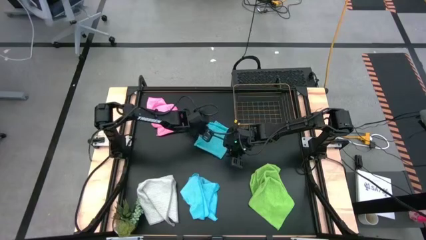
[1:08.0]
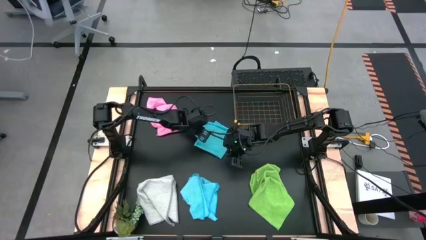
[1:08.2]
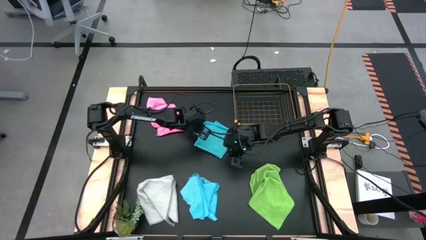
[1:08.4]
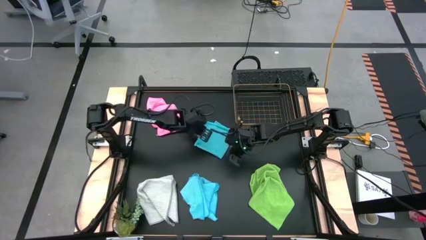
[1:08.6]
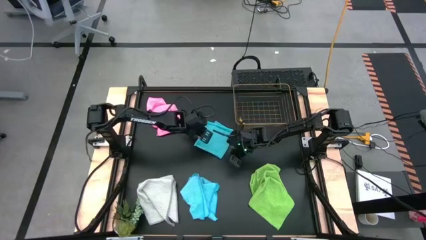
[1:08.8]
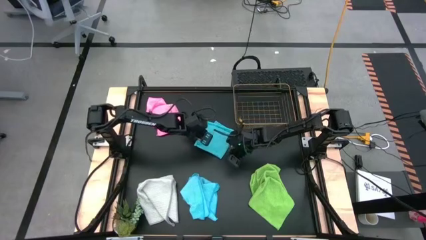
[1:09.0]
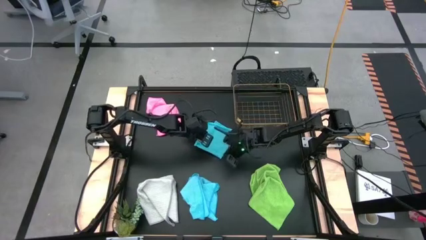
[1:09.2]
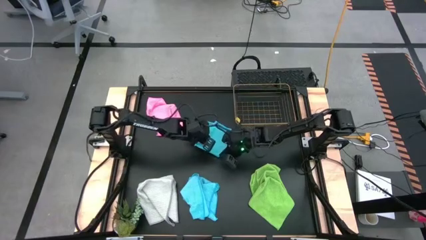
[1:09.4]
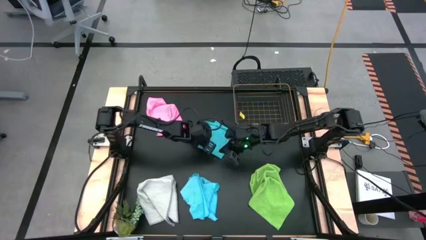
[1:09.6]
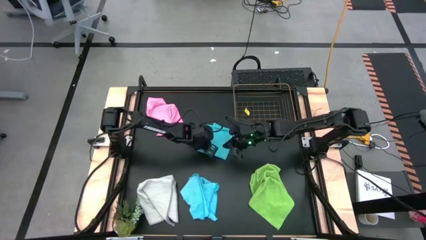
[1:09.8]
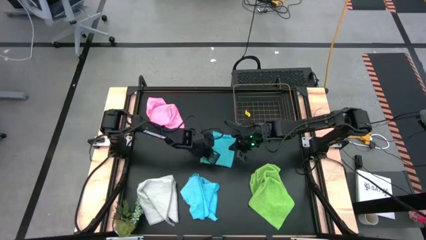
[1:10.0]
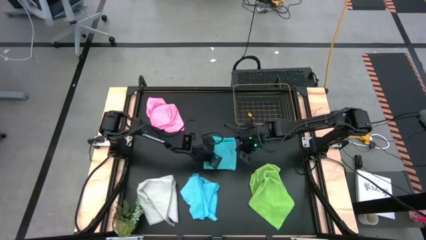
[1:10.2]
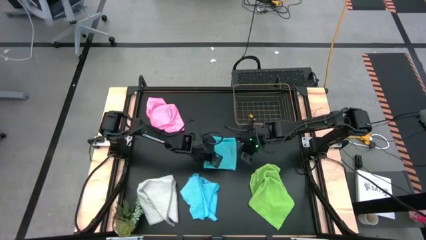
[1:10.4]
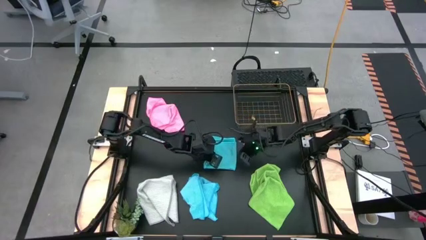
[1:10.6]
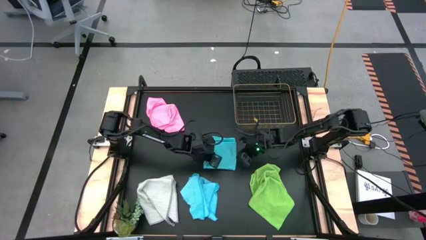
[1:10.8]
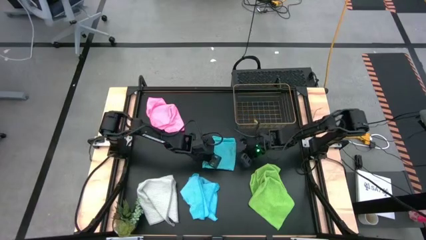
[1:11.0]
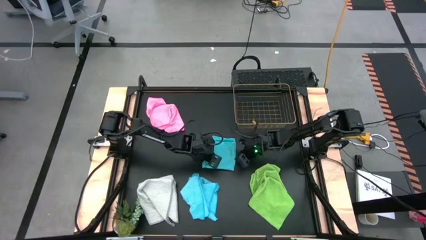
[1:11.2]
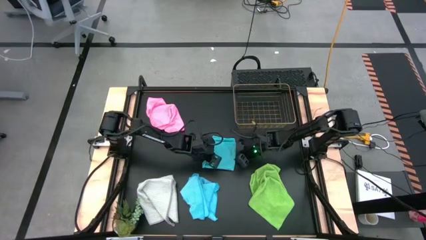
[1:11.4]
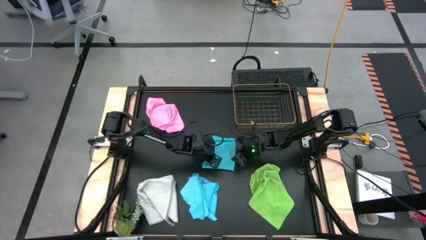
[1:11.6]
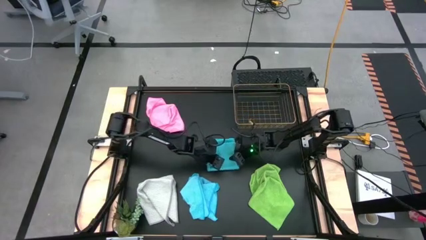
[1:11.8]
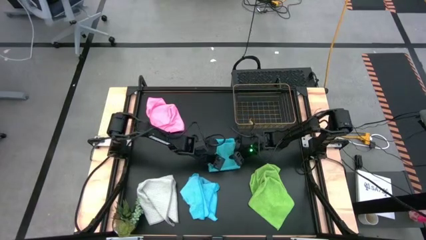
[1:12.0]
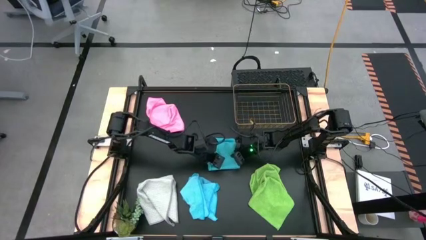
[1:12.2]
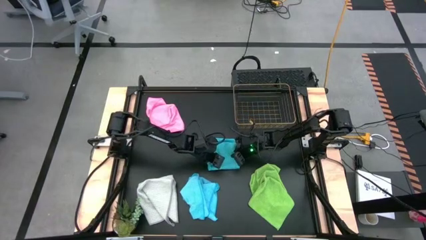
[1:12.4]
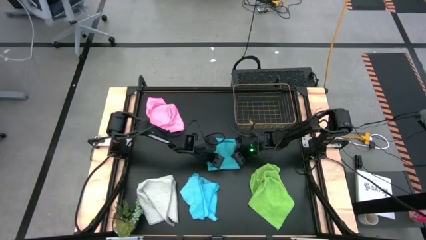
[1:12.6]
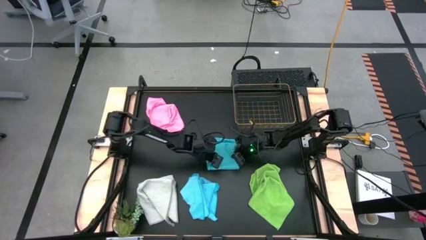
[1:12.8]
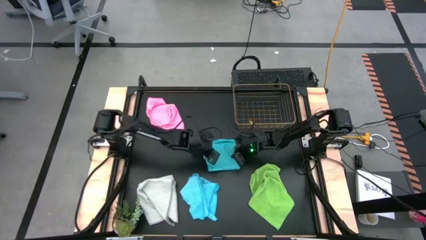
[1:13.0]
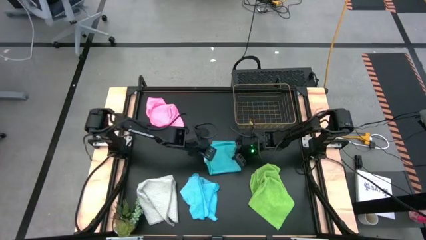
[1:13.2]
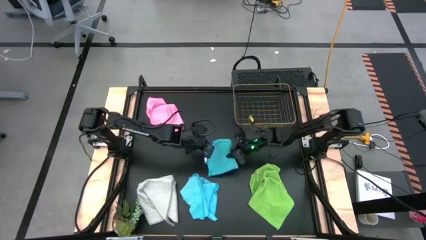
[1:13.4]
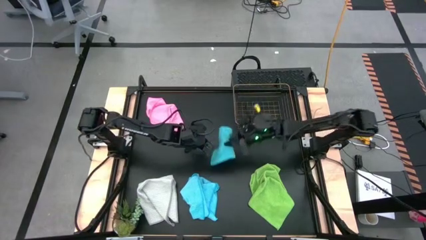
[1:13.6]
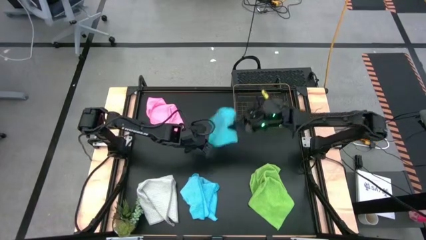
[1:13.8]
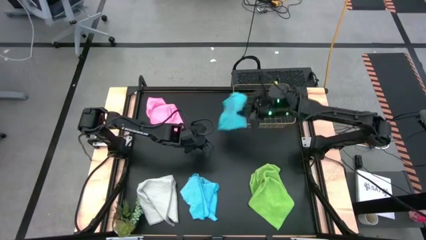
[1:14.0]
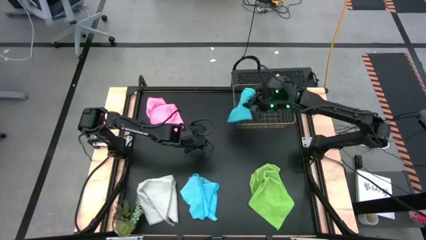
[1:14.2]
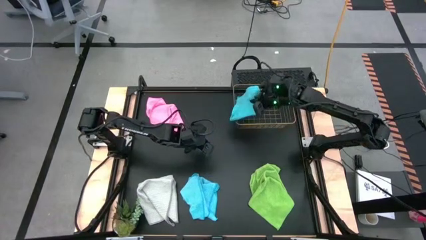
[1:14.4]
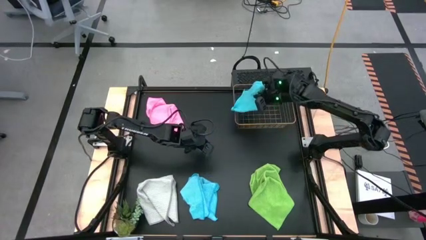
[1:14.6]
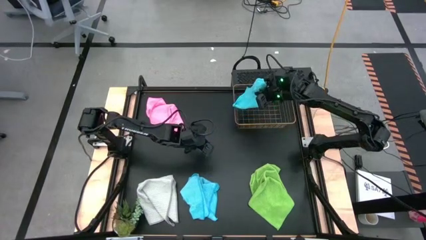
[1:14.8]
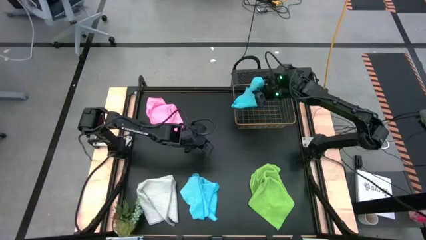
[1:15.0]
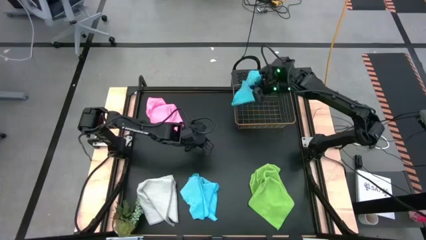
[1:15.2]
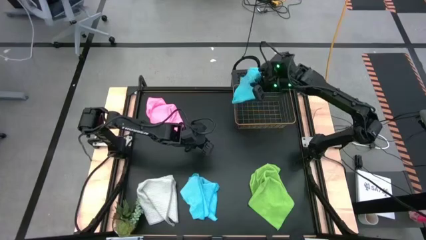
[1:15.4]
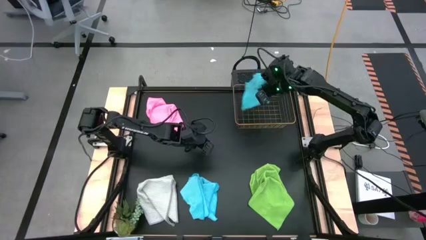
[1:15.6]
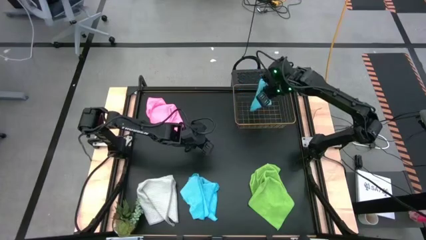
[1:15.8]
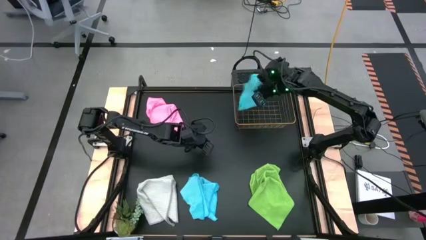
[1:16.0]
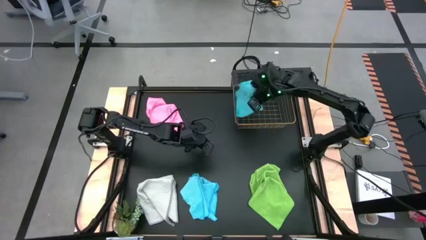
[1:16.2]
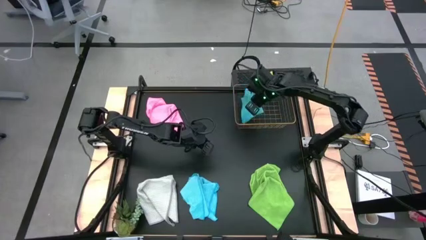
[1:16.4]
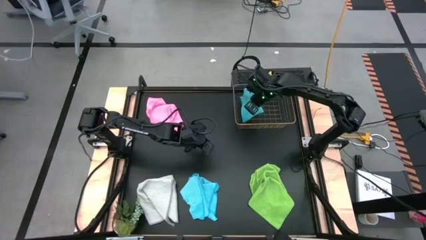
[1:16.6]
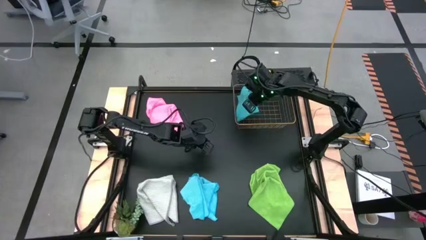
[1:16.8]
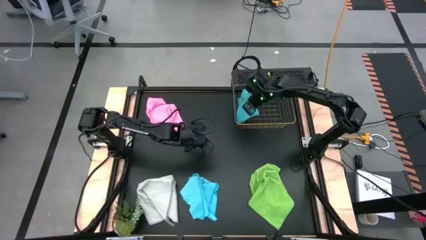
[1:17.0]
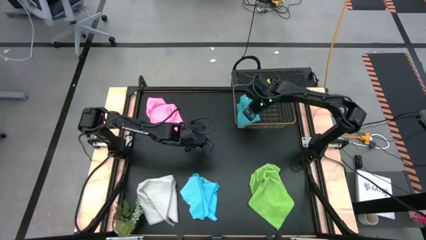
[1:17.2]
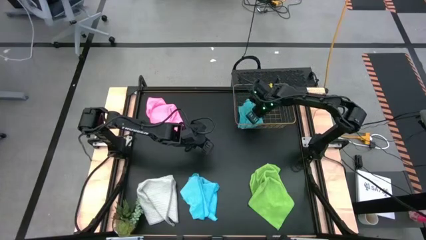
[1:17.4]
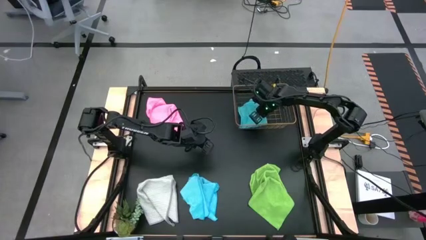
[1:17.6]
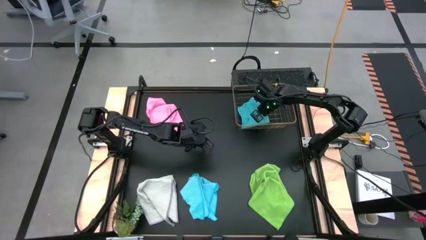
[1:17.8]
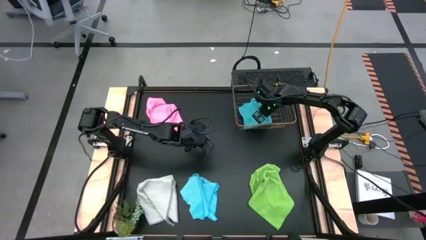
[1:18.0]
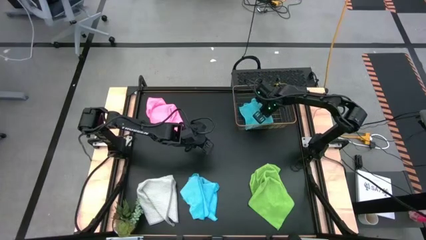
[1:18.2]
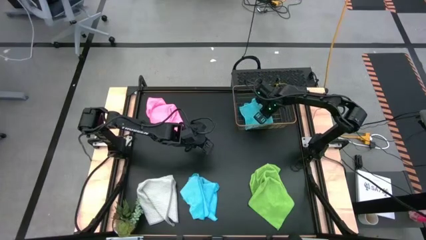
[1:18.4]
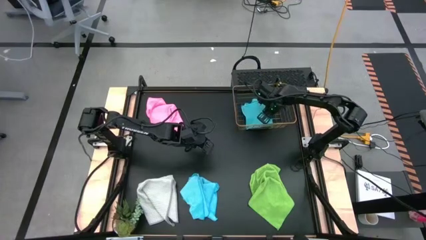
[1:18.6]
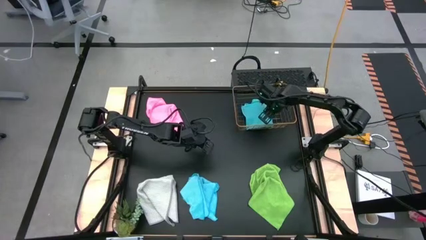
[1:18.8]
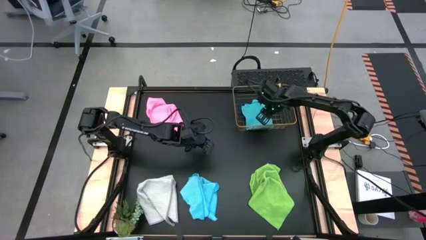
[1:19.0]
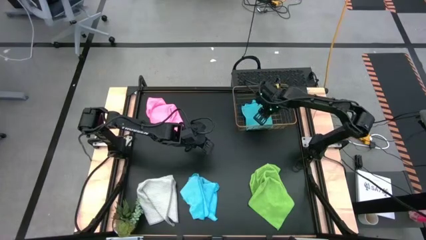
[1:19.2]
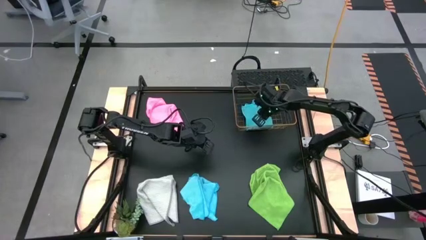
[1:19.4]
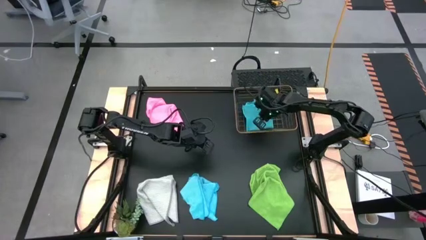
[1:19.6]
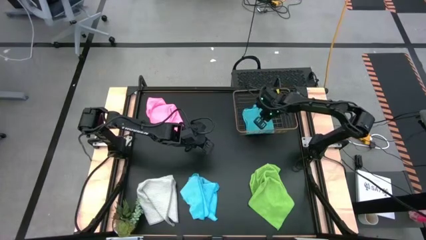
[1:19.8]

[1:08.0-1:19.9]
Task: Fold microfiber towels
Put the folded blue towel into the gold wire basket

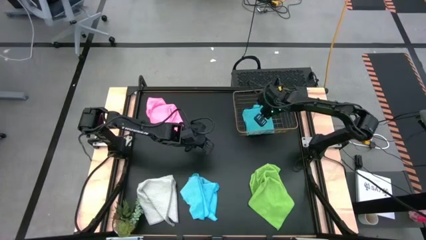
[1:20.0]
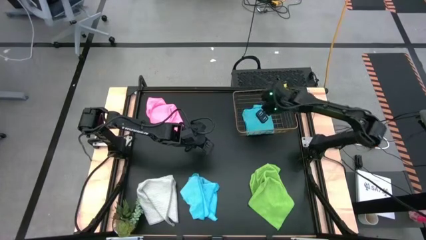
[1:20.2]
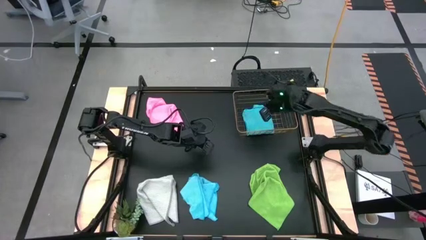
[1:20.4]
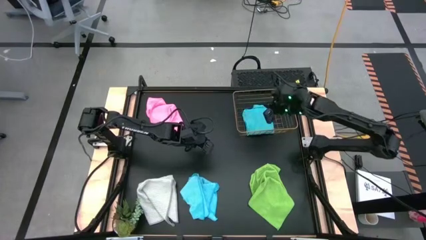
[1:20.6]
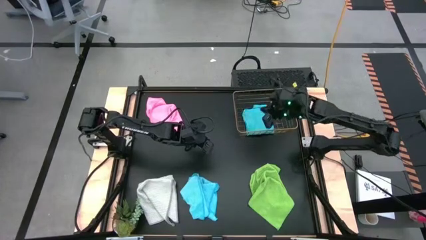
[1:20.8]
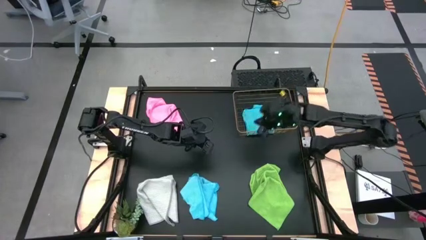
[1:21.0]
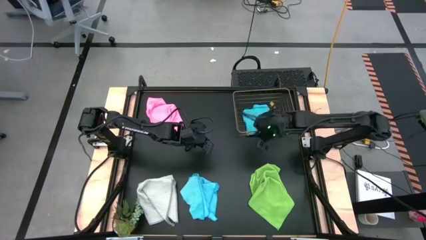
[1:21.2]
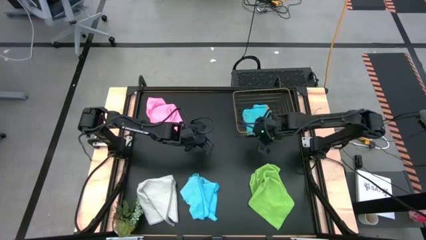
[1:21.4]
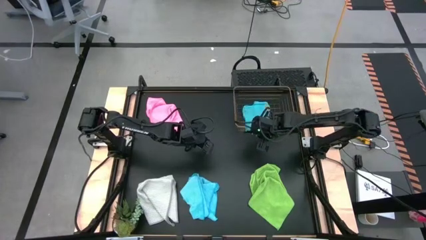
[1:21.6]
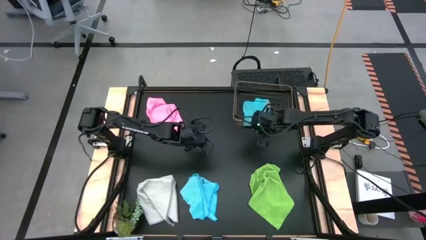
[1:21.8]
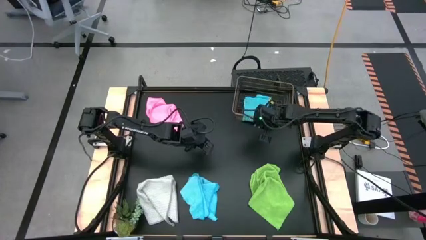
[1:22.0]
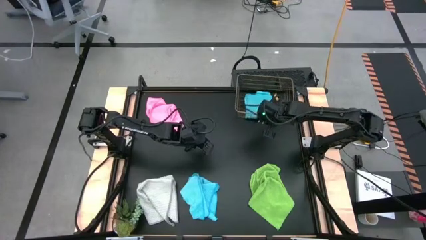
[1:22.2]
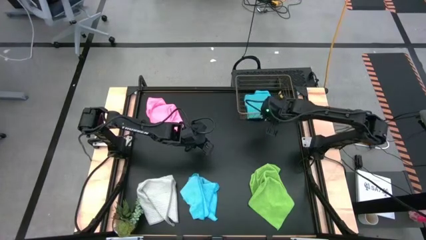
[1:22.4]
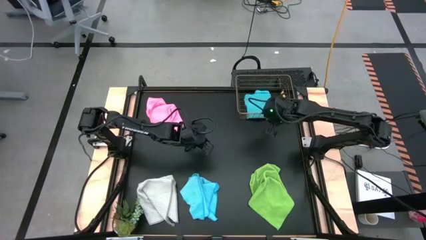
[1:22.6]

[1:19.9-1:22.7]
Adjust the gold wire basket on the table

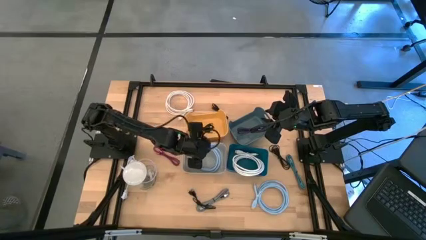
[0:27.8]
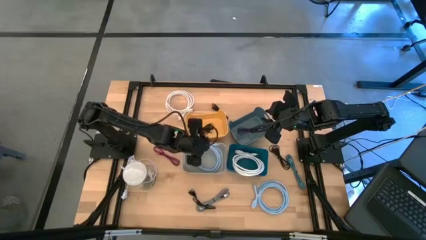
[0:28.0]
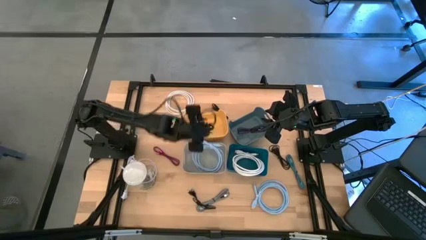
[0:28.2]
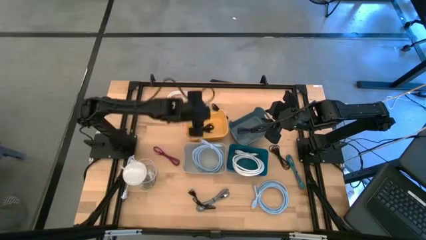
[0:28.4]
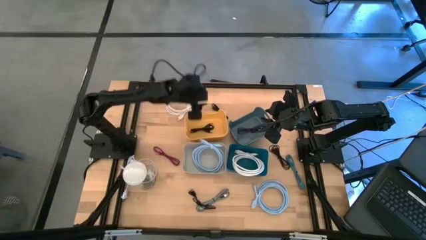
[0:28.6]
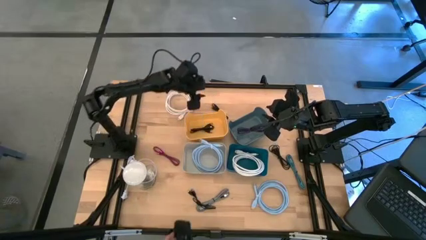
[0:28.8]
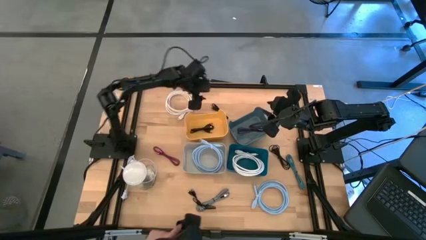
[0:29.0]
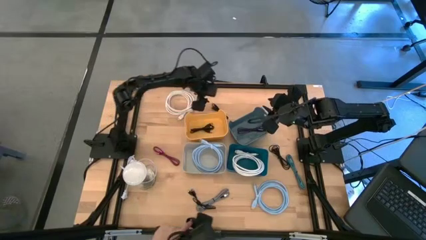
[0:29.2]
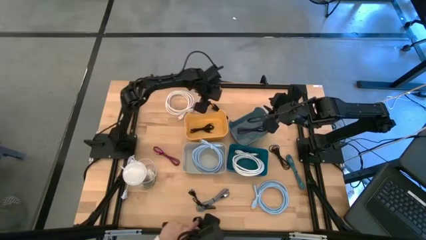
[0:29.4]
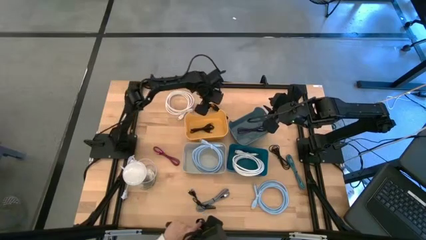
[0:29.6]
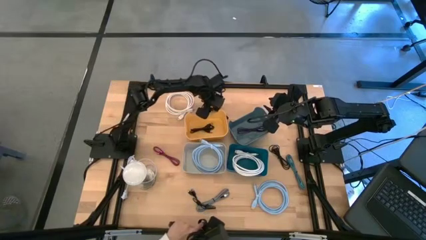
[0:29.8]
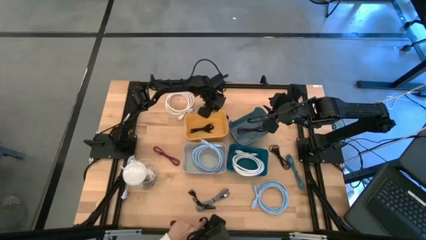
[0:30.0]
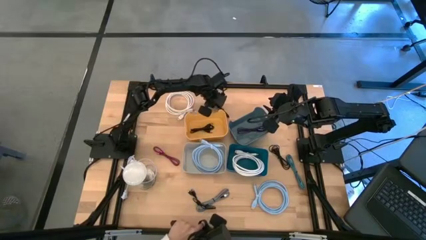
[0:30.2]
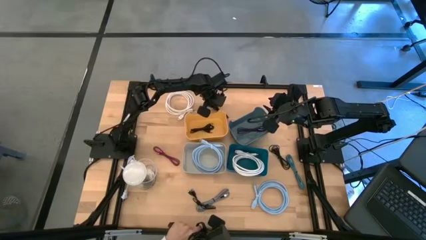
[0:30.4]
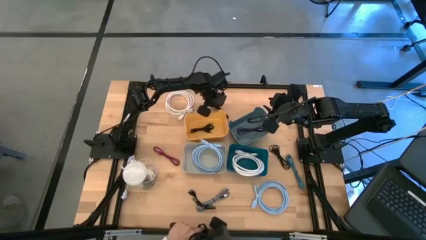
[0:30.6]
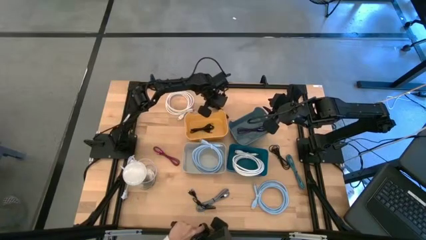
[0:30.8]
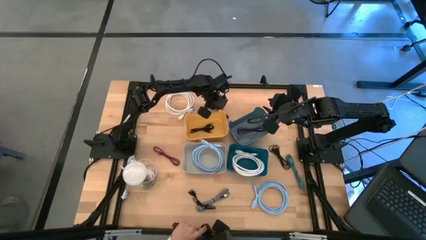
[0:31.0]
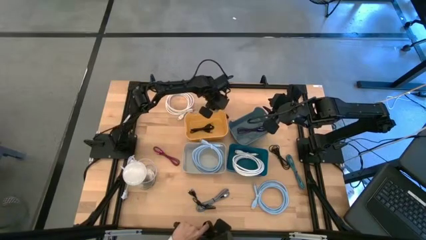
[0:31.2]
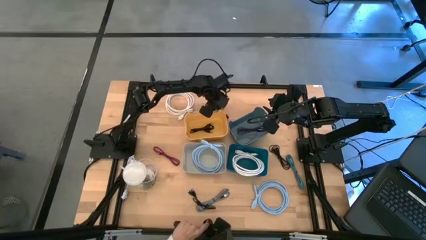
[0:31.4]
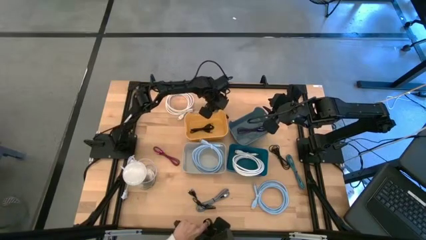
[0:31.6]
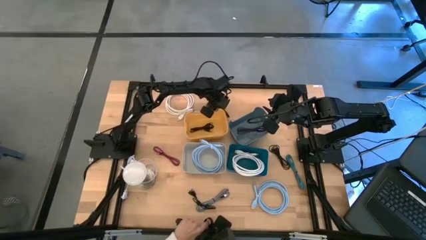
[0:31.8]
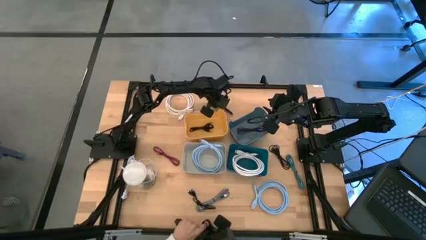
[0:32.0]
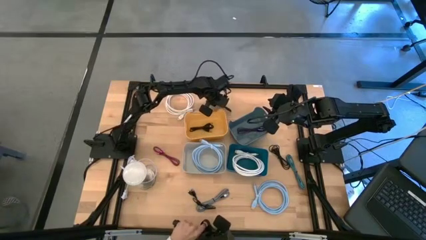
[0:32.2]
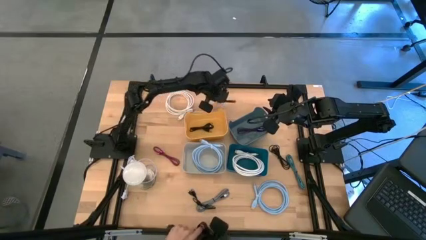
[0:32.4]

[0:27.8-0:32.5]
Task: Pick & Place USB Port
Put the black USB cable into the yellow bin
